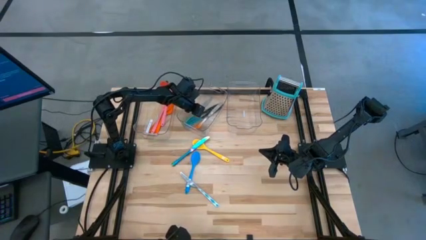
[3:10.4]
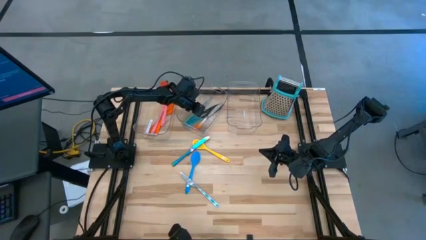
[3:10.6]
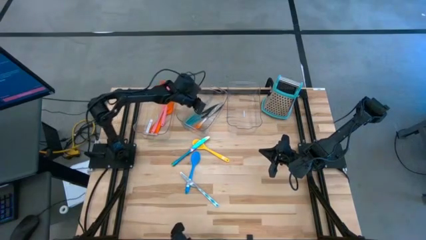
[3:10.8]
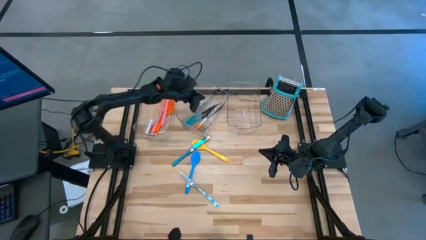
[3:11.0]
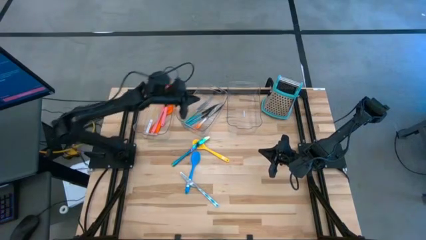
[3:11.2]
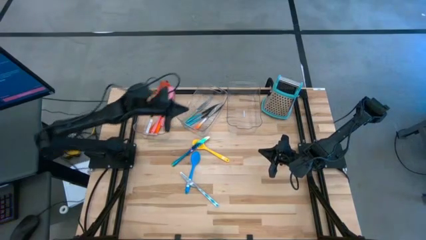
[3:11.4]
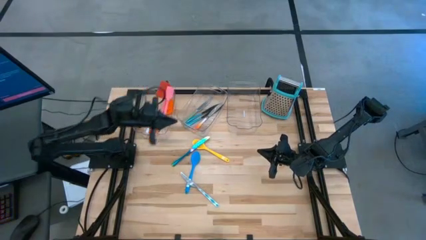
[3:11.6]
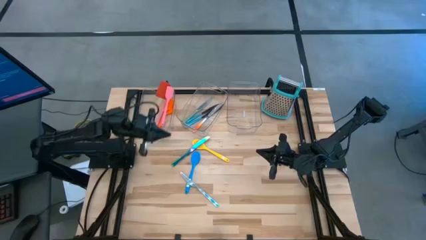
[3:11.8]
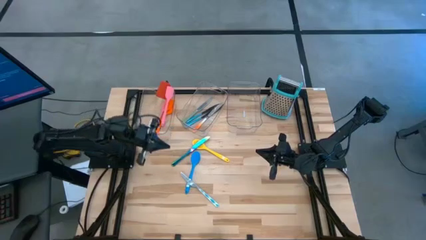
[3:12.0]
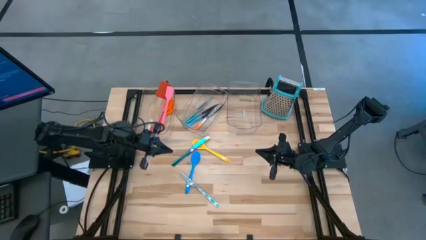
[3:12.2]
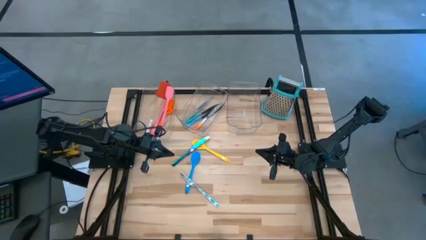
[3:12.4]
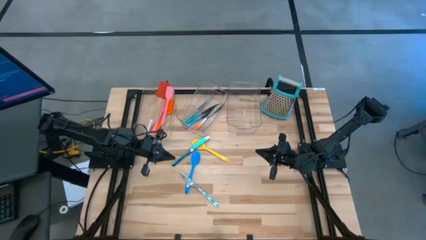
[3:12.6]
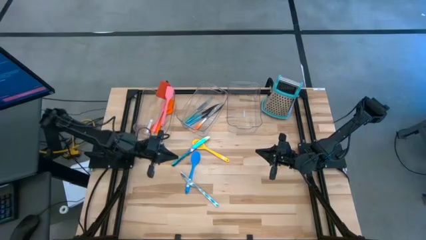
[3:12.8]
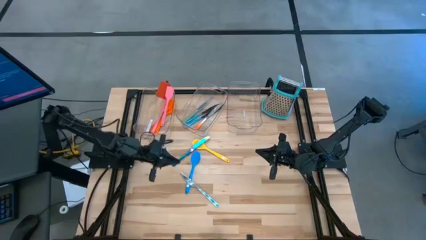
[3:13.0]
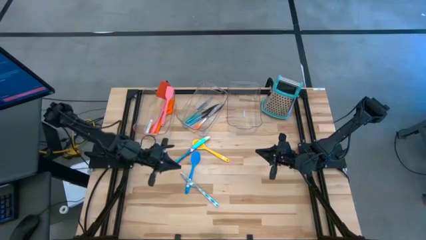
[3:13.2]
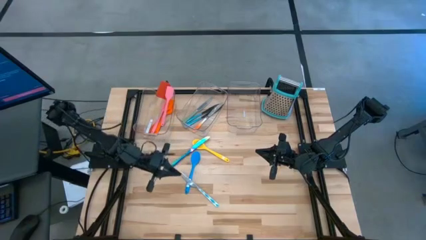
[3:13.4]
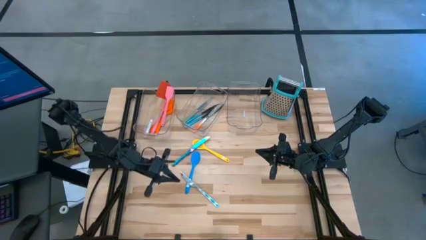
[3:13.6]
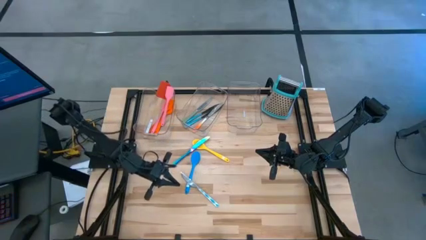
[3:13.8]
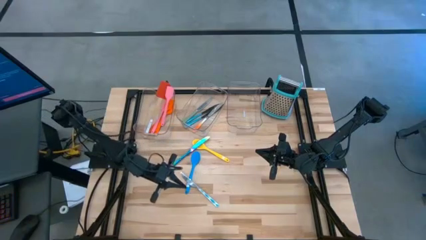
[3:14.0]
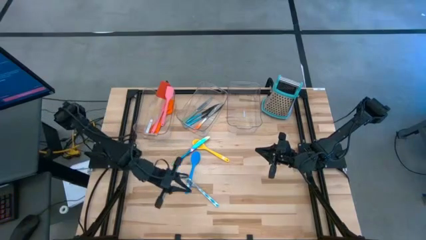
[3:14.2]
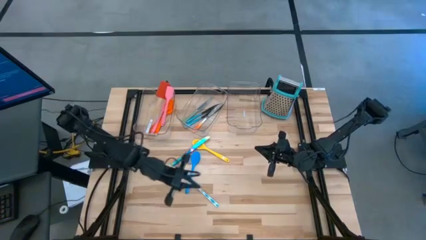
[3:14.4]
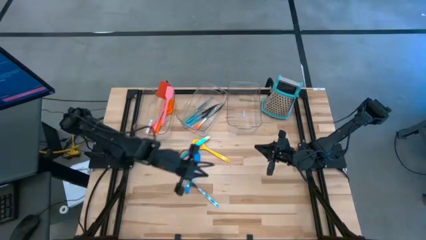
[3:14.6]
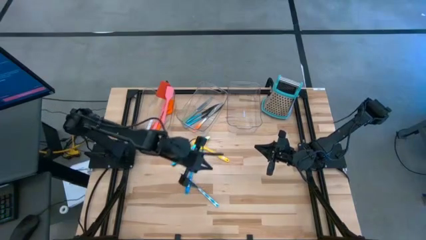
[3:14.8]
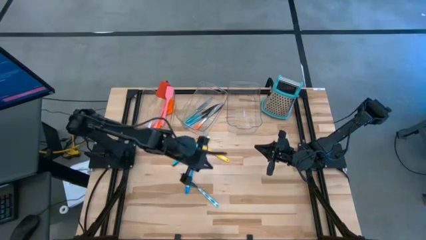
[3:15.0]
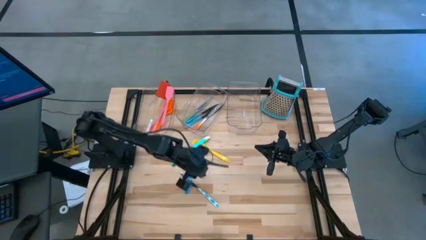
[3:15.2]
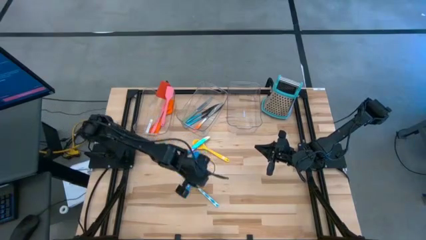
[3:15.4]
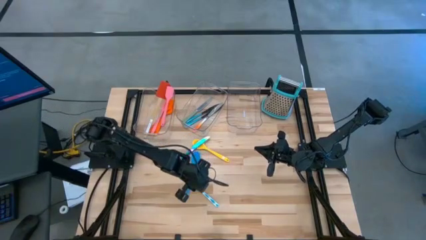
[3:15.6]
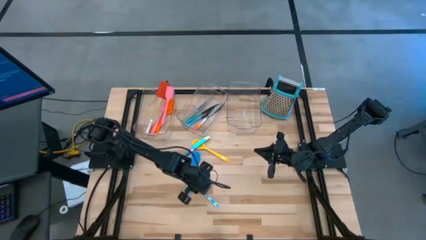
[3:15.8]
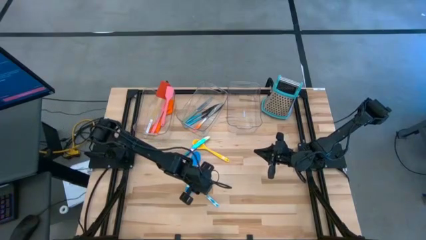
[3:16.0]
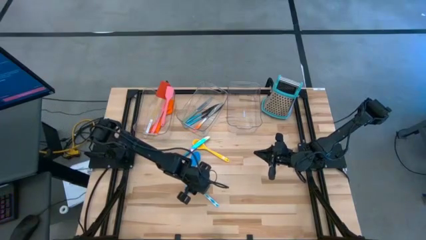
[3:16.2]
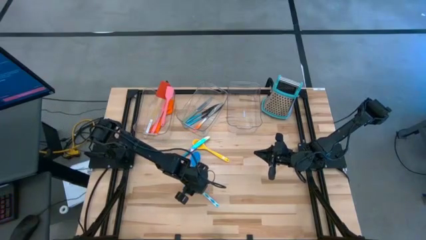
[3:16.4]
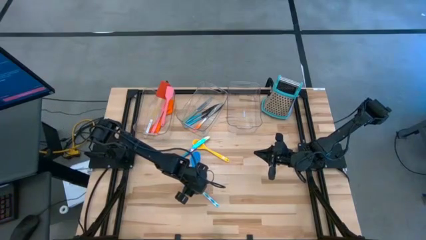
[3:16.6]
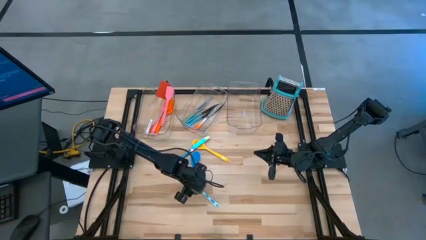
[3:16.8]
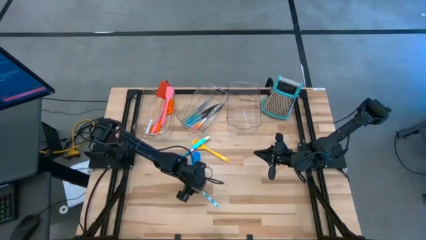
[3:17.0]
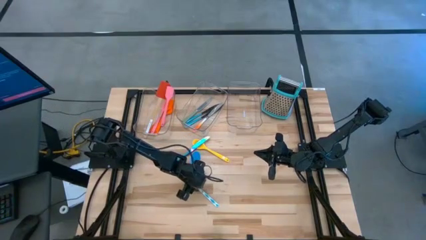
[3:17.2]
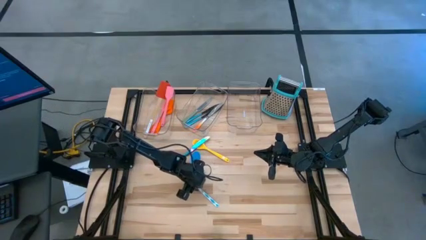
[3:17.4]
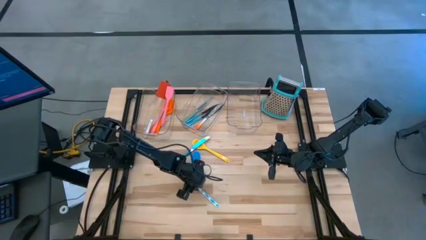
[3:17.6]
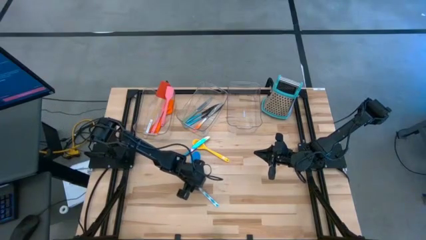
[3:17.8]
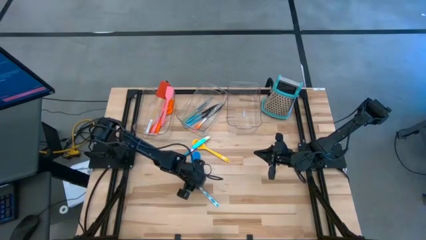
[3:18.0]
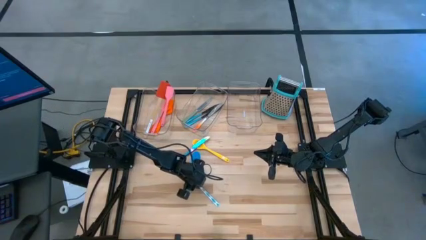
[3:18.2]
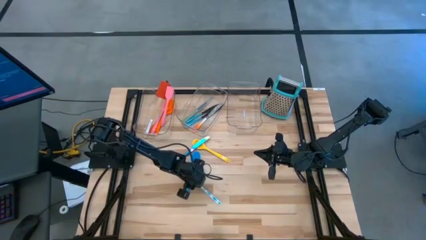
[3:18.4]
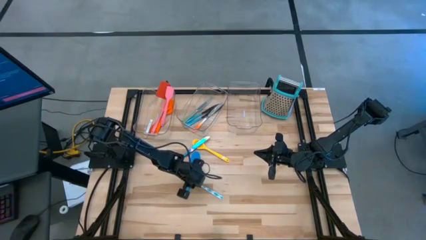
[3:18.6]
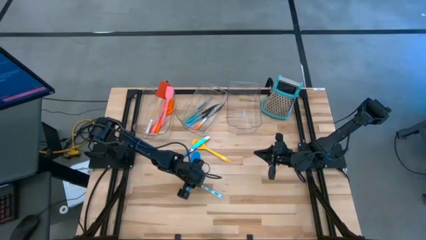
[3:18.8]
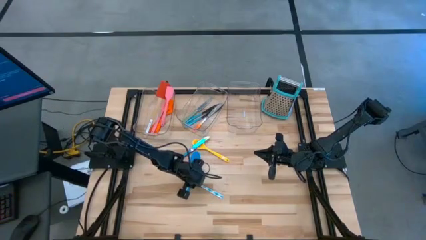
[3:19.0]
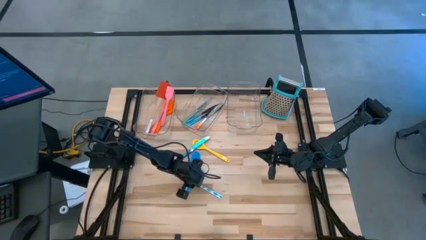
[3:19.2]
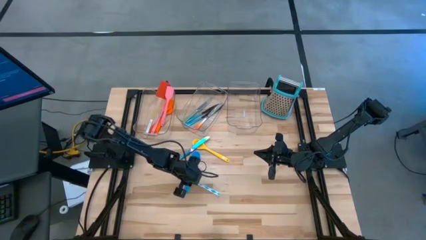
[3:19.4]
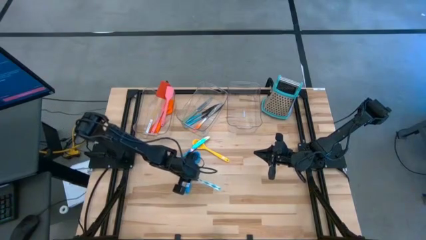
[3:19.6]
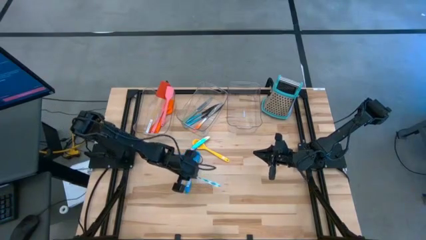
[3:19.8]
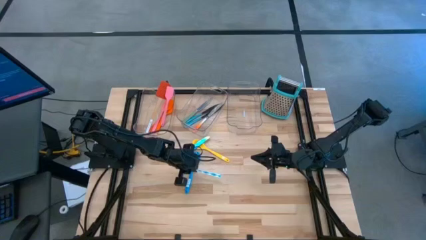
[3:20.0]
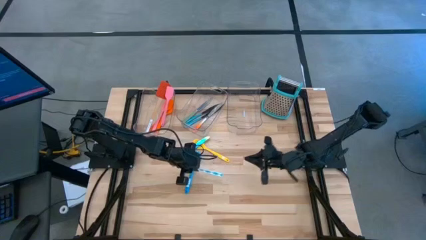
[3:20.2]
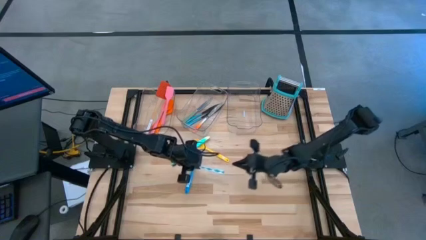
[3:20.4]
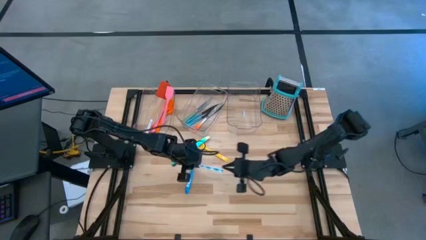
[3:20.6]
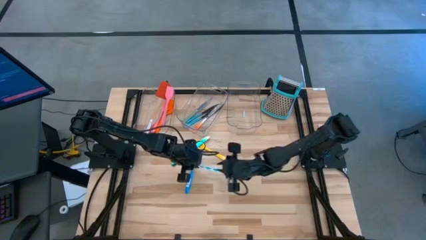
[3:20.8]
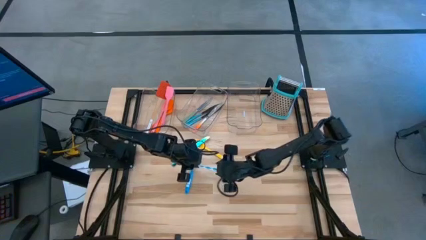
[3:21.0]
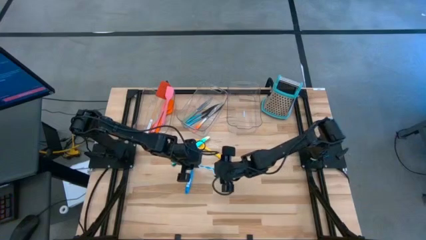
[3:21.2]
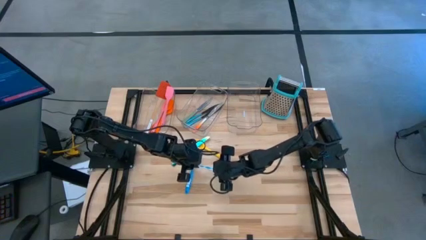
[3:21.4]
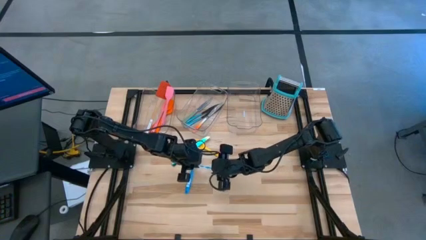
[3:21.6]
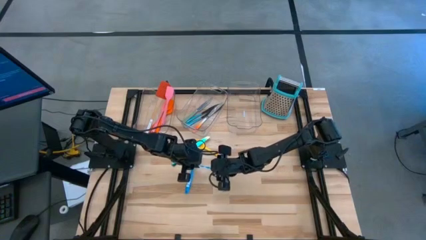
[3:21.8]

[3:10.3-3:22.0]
Task: Pick & Place Kitchen Items
Put the white patterned knife into the middle transparent bin

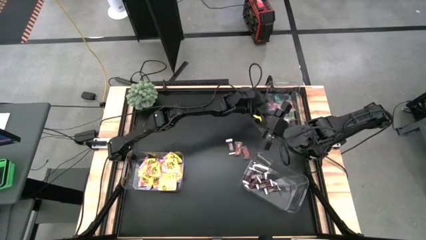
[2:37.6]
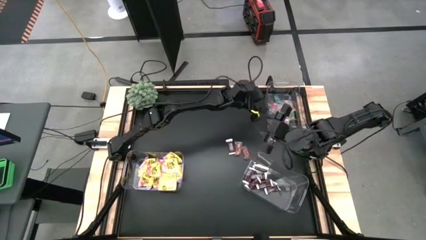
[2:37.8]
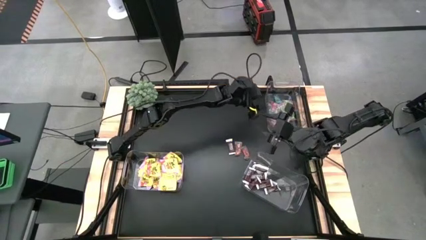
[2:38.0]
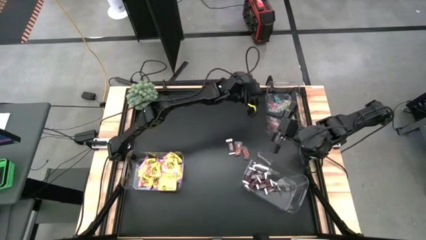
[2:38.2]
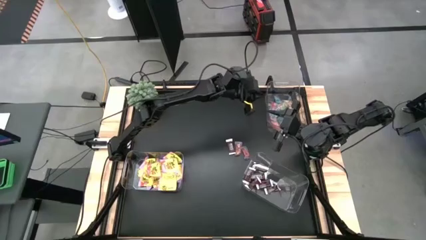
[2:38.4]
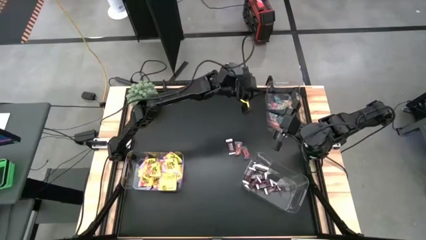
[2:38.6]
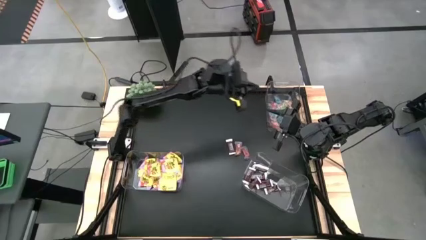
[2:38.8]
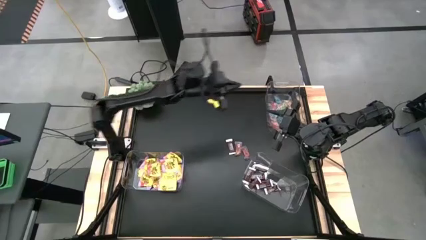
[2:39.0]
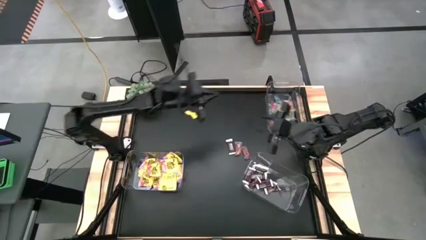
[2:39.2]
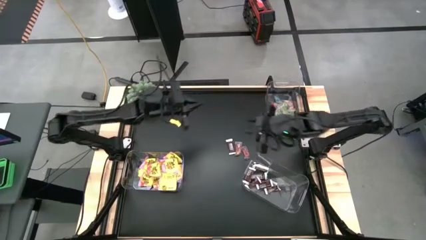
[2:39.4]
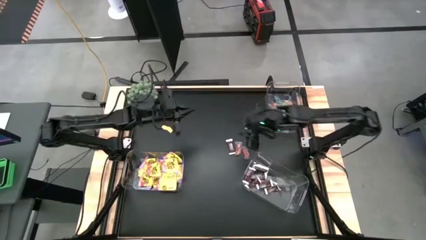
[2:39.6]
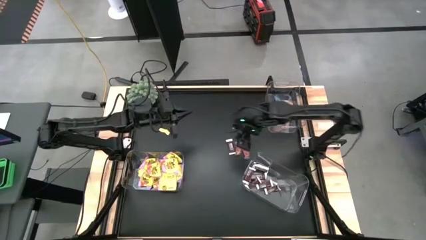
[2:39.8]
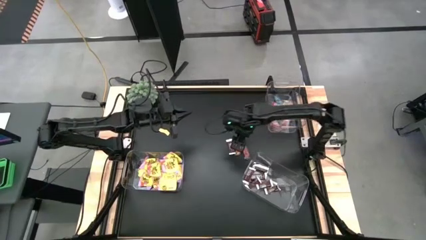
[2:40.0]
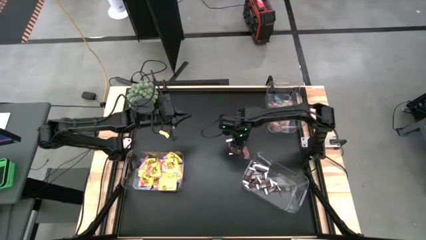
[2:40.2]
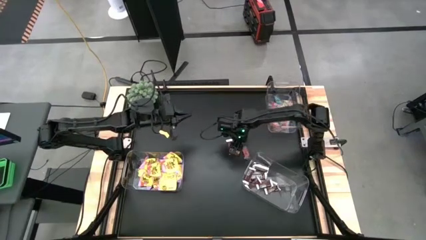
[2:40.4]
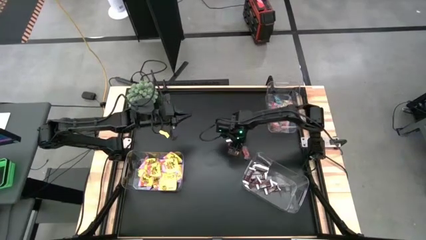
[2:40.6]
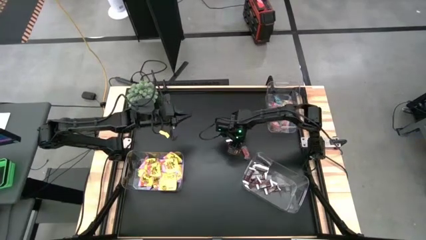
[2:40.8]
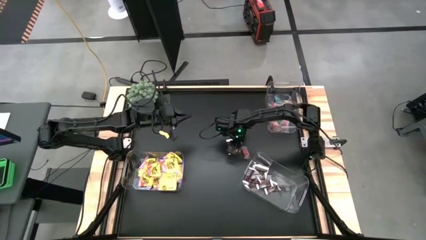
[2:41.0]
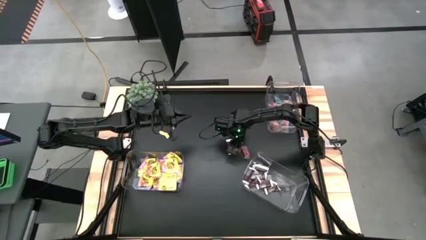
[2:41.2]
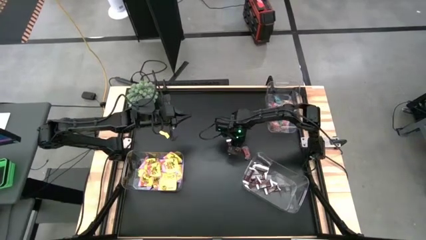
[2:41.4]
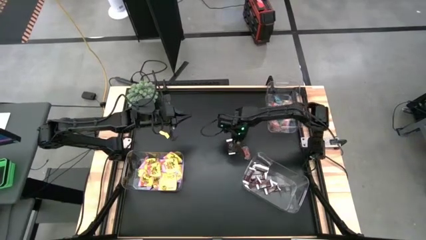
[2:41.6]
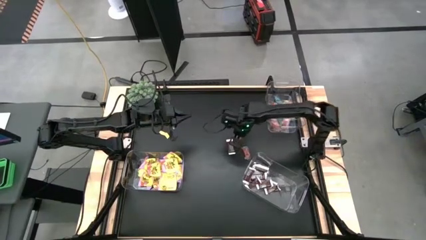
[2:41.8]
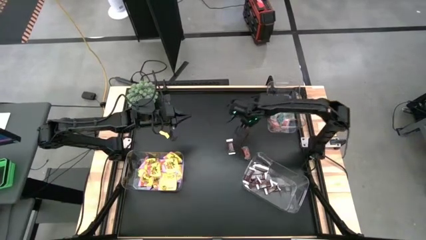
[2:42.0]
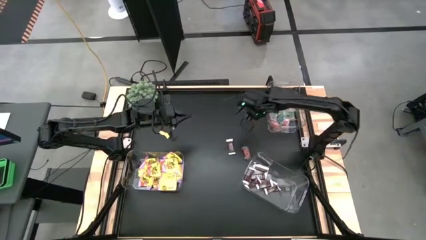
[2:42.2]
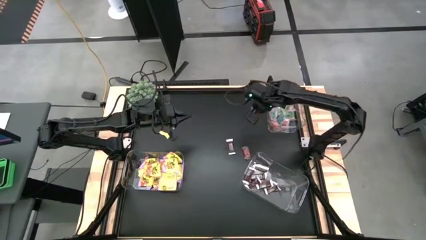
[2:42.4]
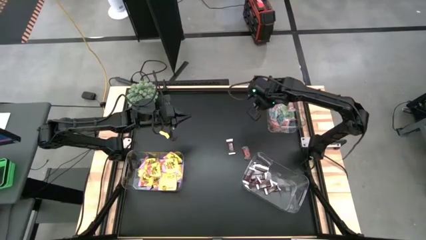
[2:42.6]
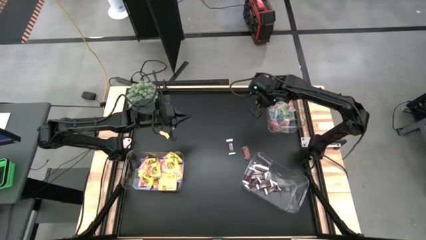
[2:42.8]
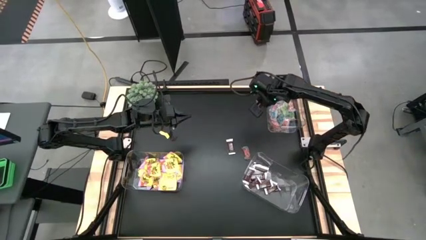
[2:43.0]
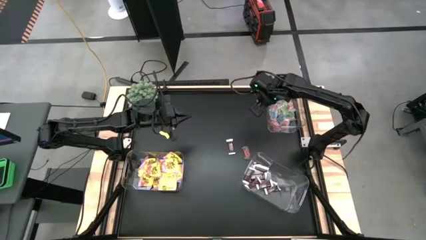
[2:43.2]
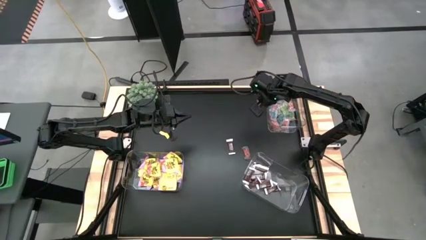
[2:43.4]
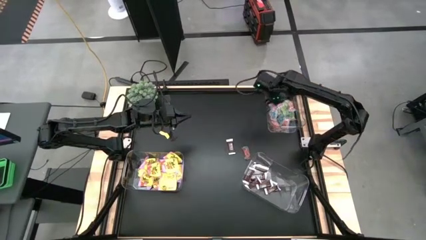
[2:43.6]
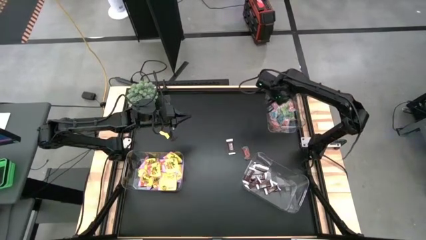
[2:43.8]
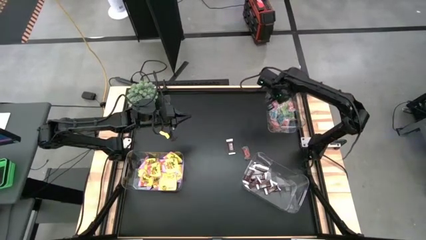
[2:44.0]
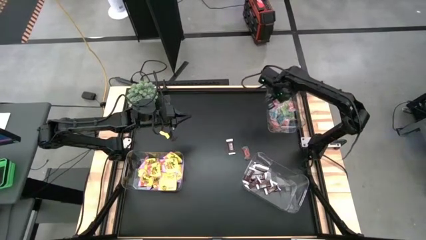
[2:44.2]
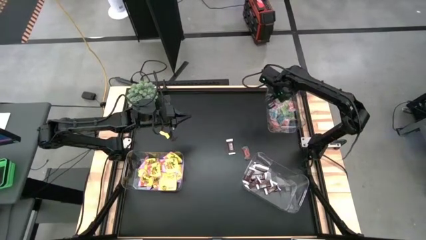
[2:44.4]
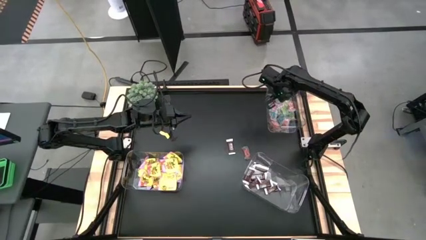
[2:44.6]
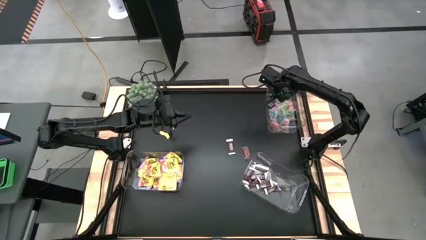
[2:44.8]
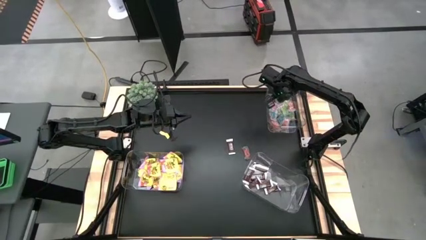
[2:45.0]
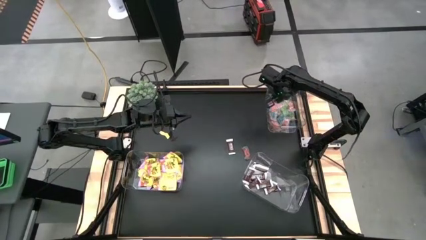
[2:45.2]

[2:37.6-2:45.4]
Task: Sort candy
Put the orange candy in the top right transparent container
